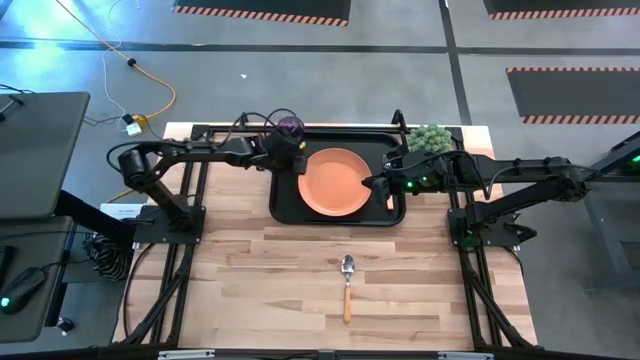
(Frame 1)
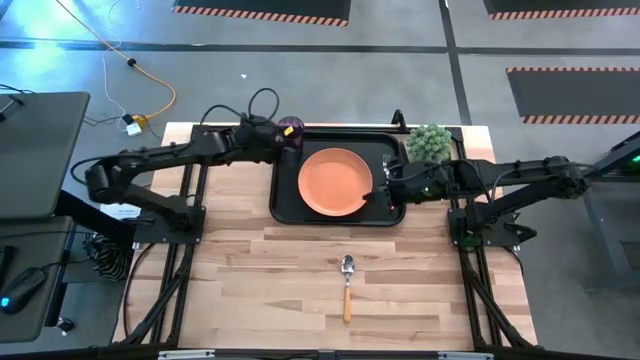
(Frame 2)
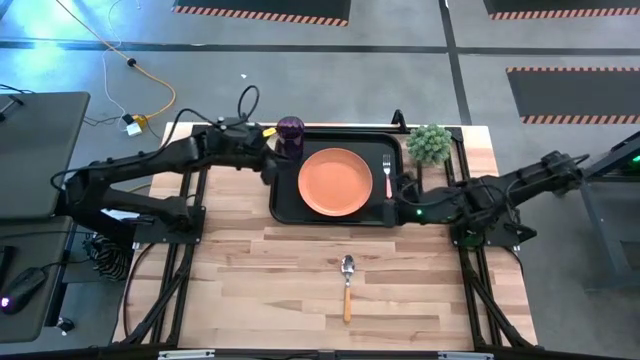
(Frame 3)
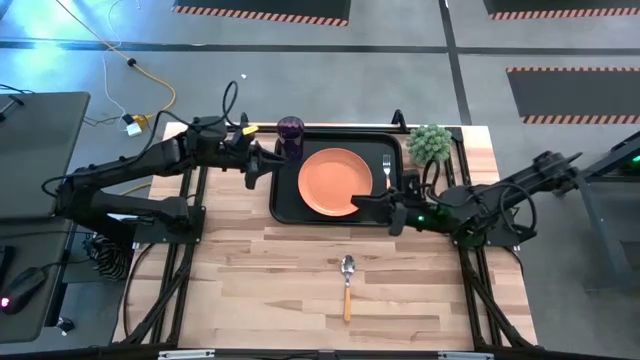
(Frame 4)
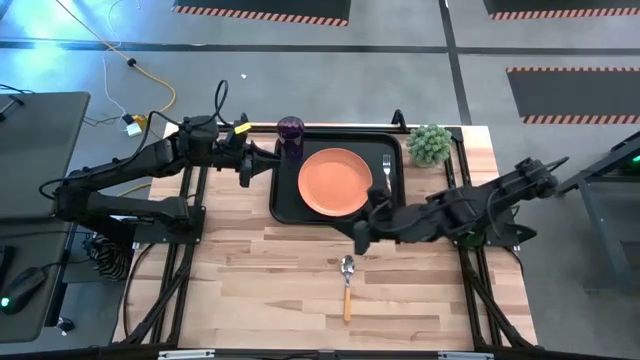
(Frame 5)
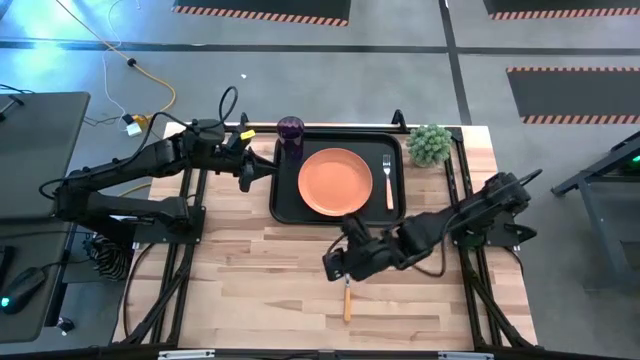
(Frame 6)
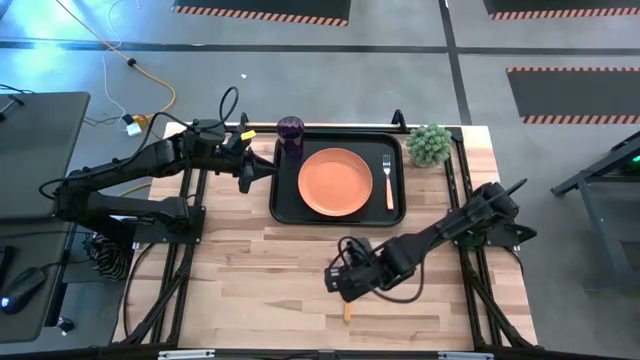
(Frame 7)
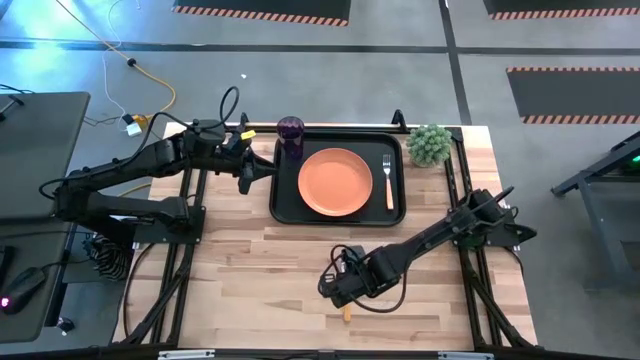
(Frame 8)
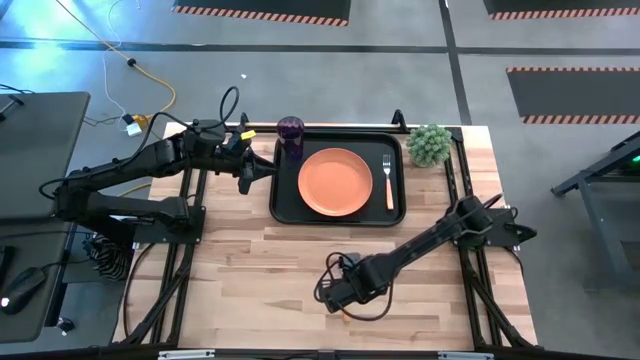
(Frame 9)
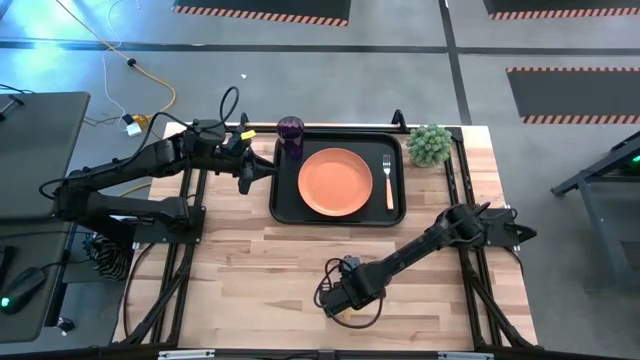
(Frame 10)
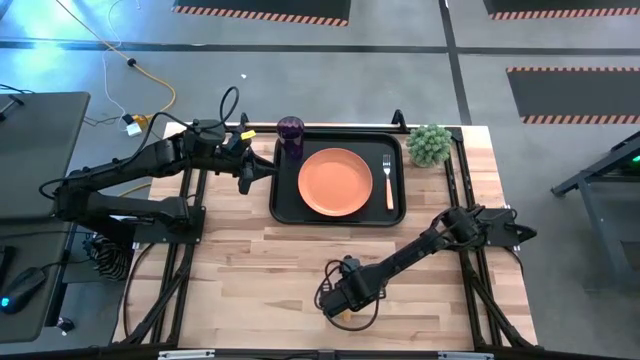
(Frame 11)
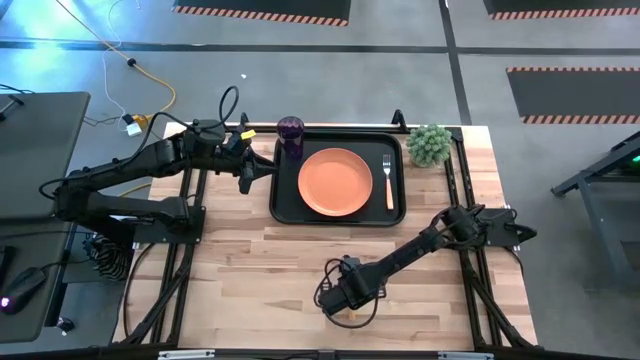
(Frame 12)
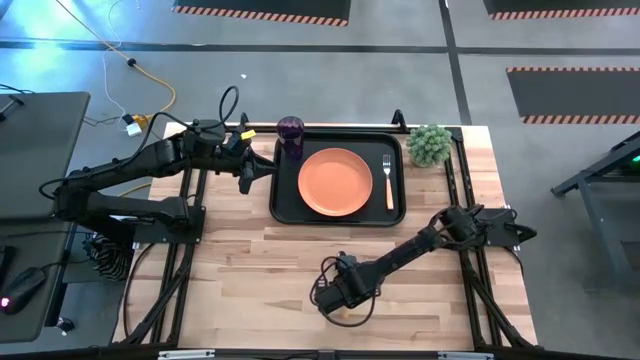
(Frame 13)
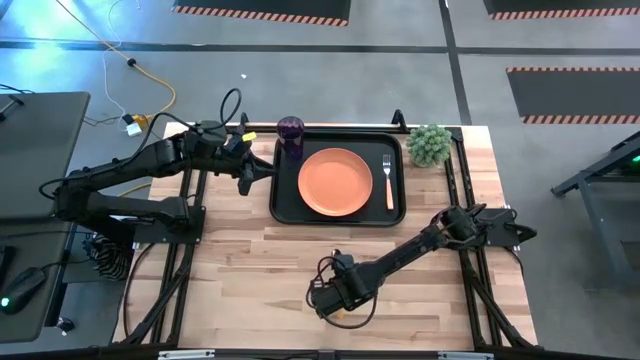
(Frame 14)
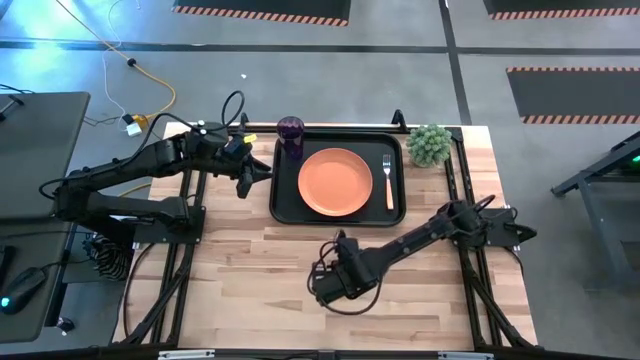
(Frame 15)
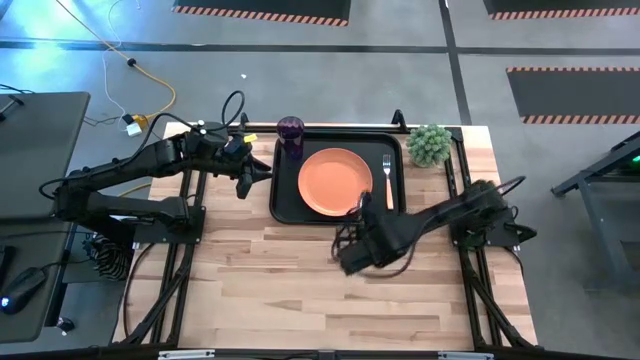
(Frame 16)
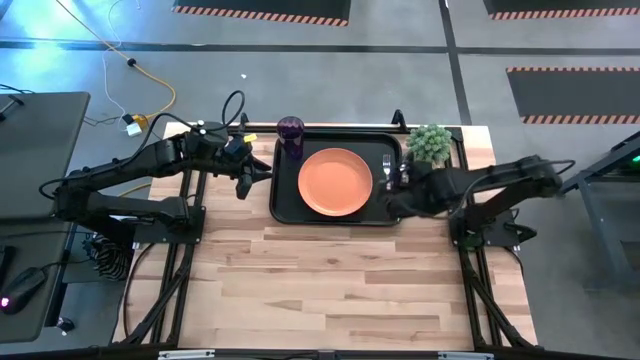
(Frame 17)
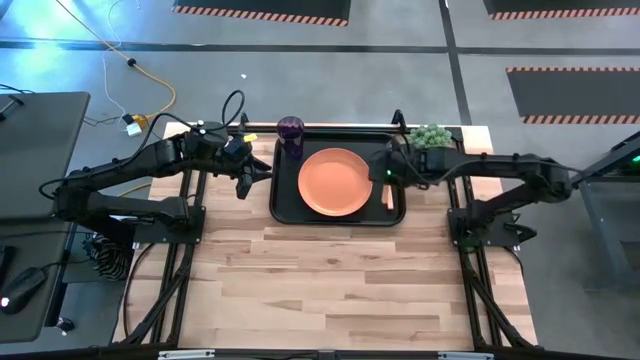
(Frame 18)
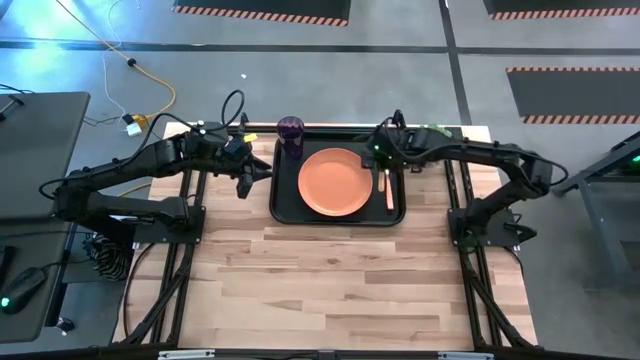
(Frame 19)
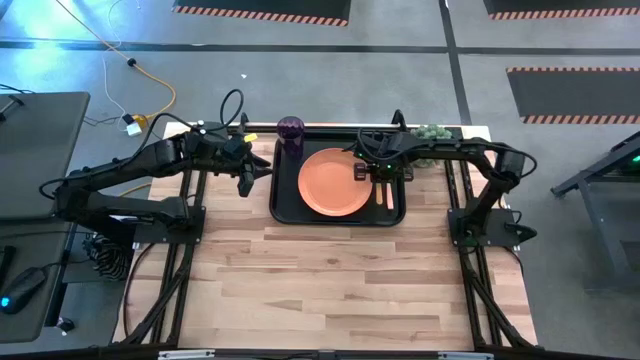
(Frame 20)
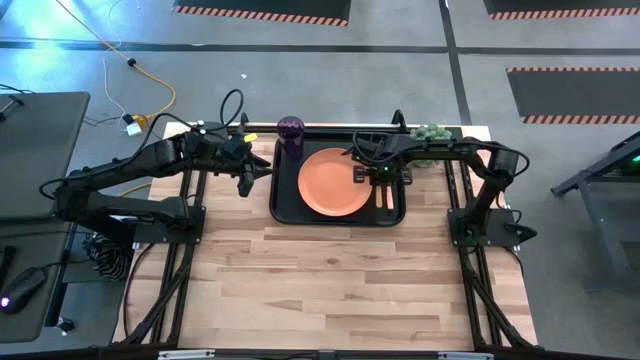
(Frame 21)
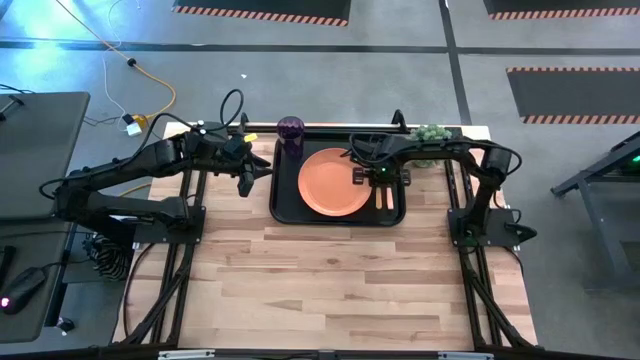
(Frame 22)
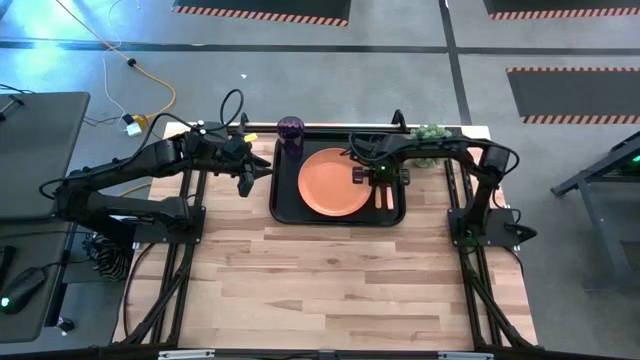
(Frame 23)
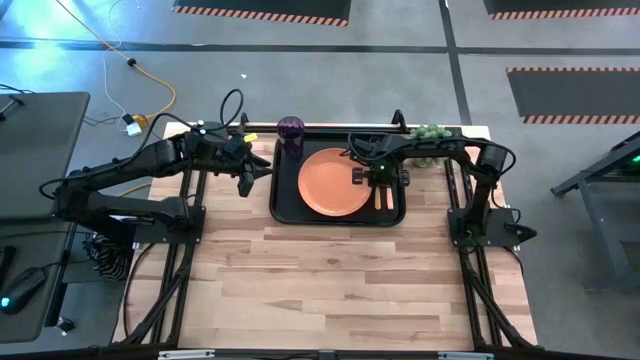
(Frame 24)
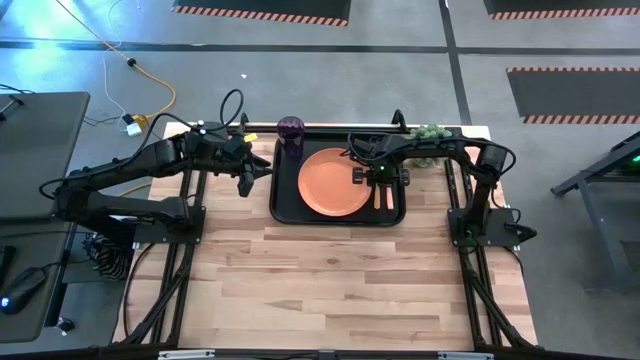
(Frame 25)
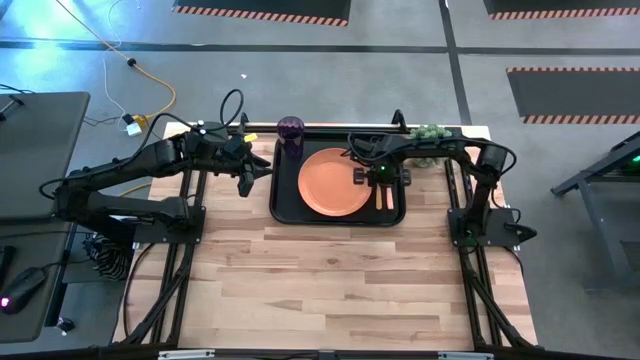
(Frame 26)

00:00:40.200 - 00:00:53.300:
Task: Pick and place plate/cup/fork/spoon on tray
Put the orange spoon on the black tray

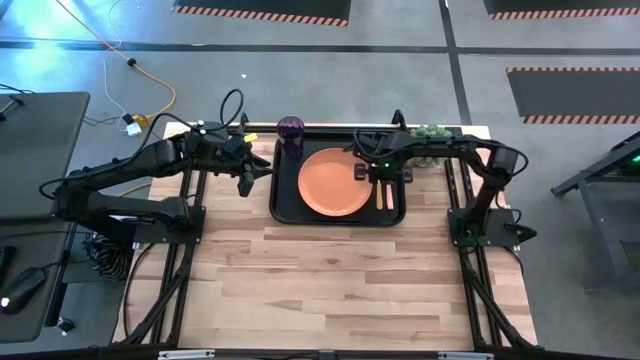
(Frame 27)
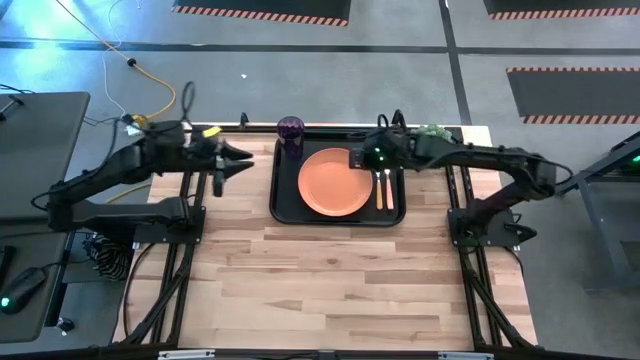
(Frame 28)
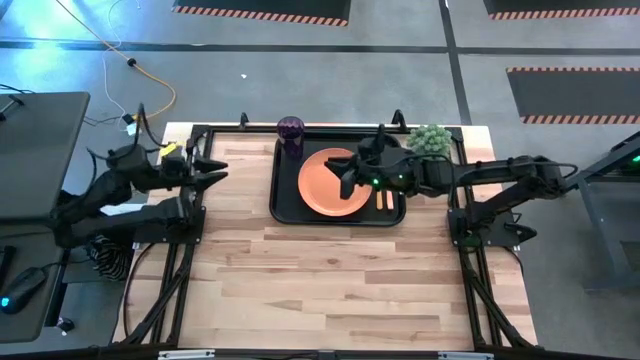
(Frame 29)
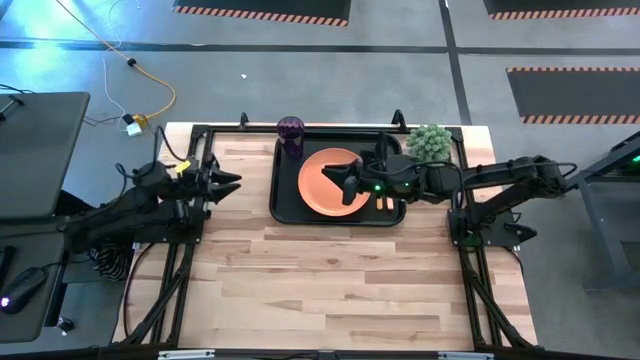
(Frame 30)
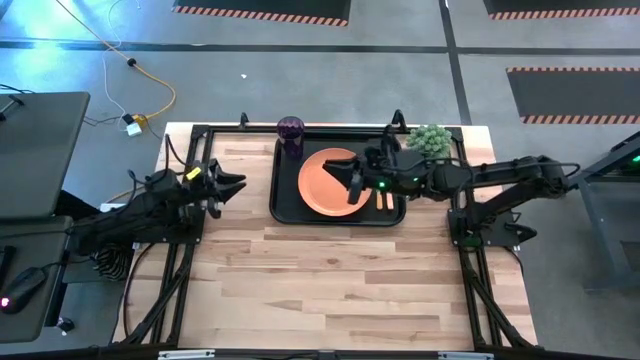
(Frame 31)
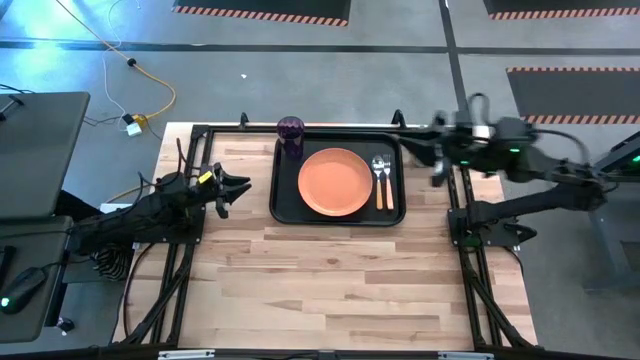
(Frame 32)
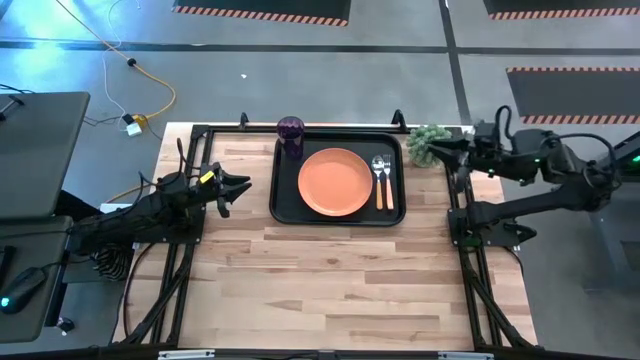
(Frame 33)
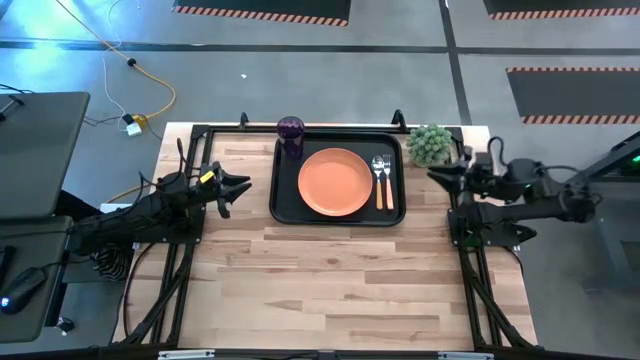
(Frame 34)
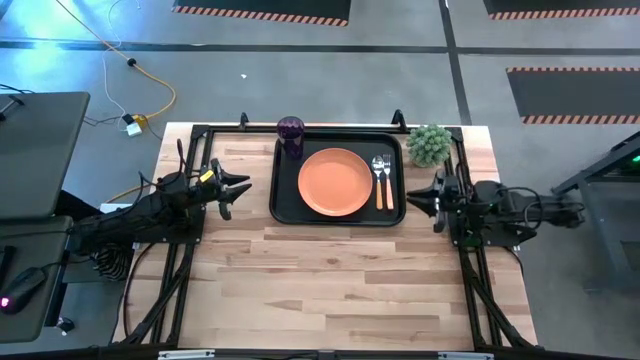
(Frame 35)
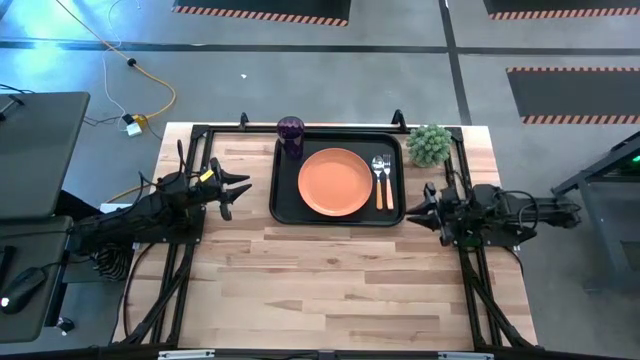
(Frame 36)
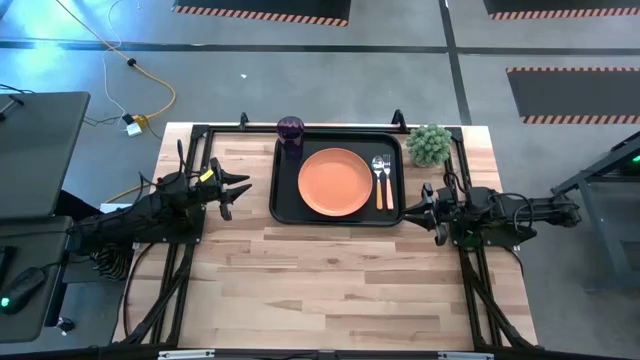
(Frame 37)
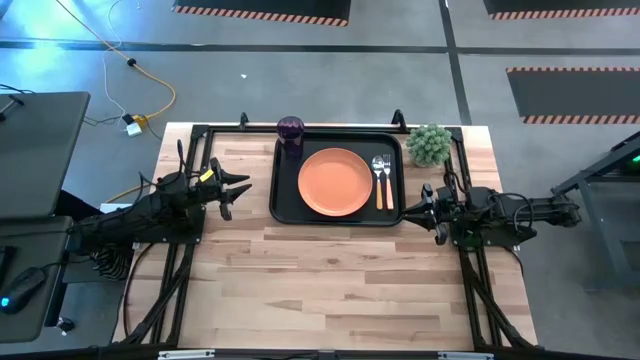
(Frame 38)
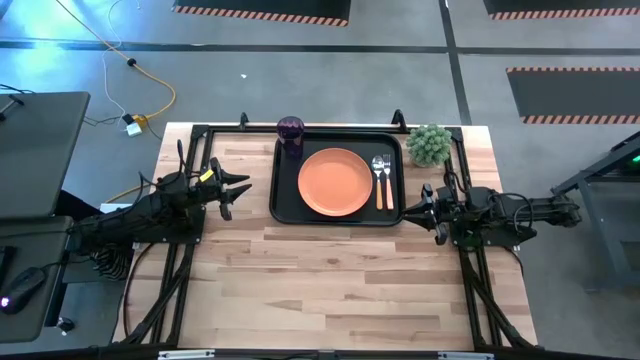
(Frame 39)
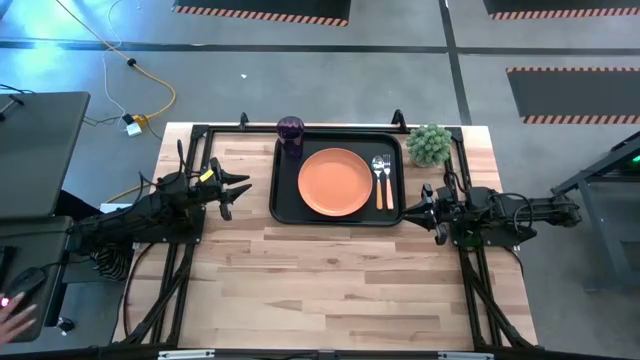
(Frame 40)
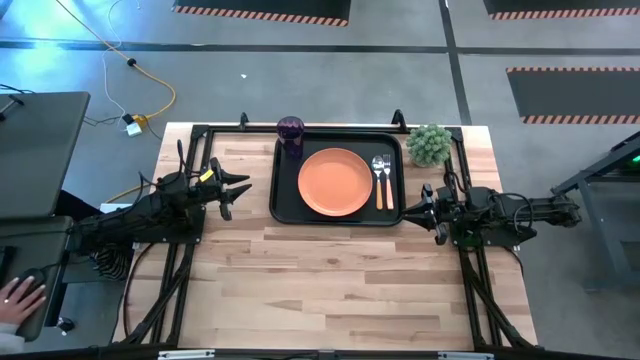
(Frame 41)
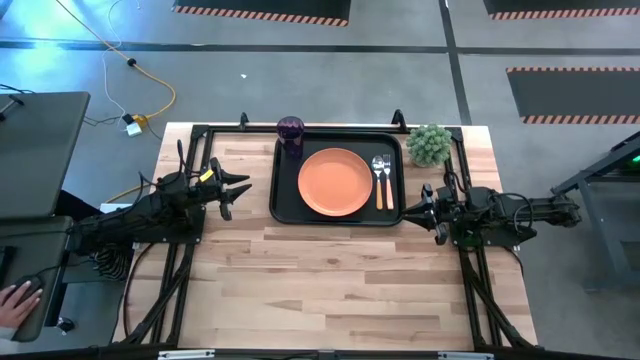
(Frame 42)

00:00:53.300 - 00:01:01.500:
Return to Home Position
